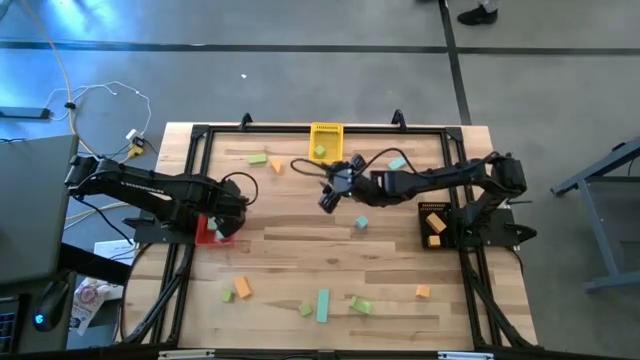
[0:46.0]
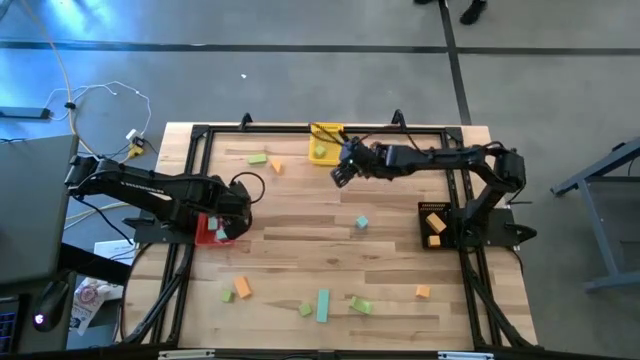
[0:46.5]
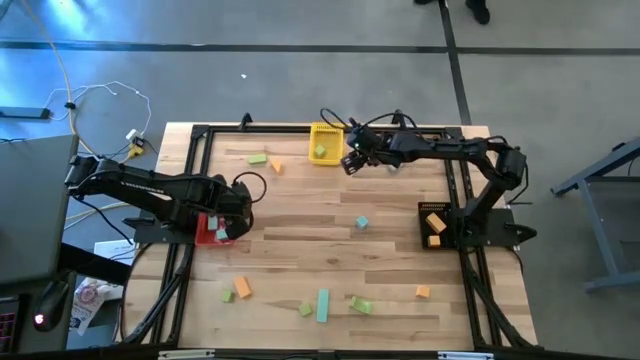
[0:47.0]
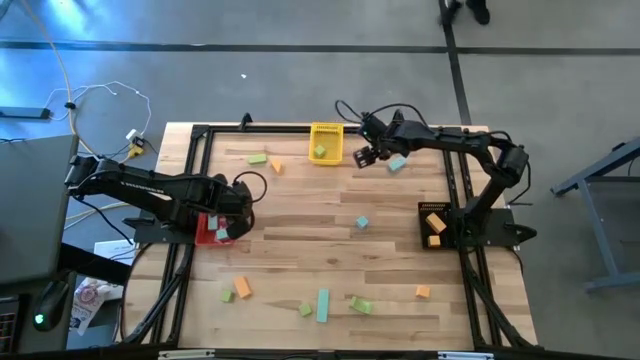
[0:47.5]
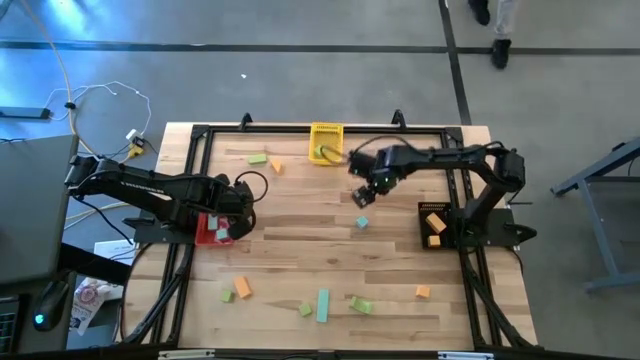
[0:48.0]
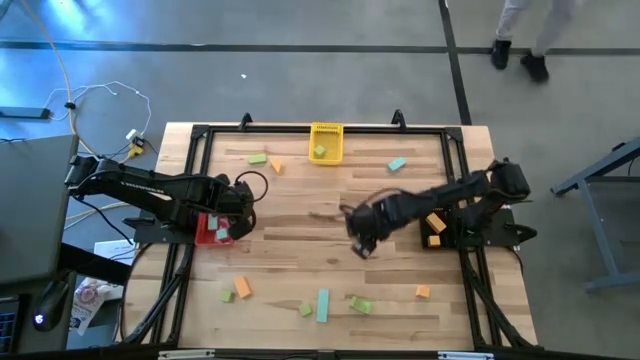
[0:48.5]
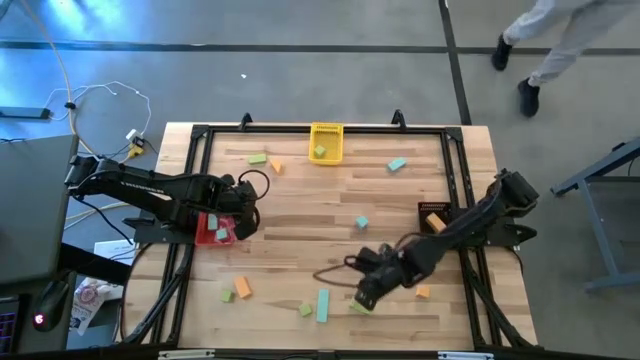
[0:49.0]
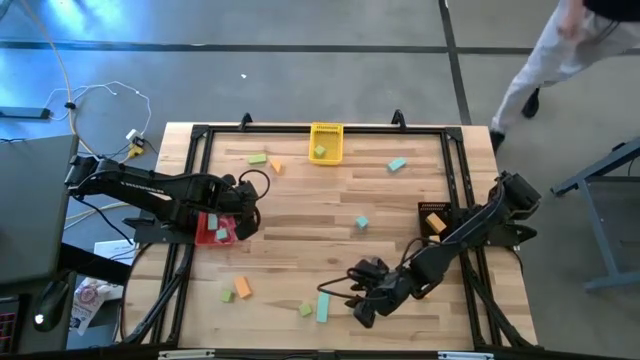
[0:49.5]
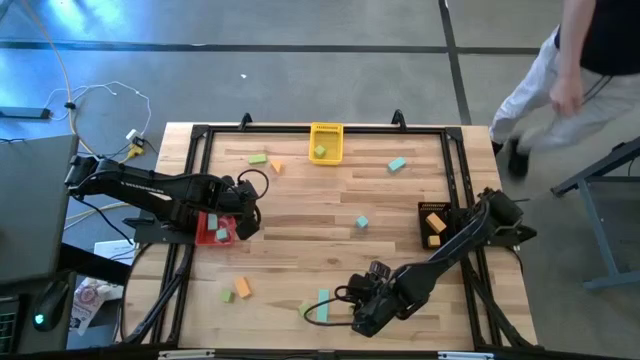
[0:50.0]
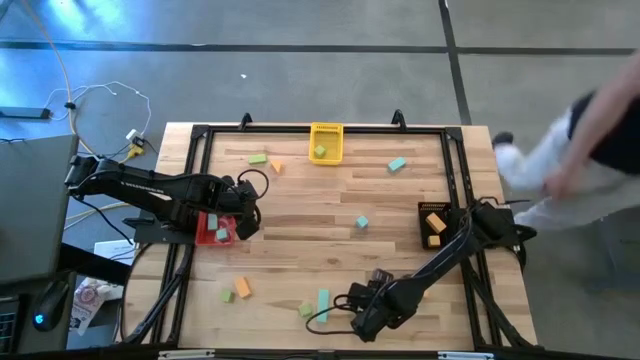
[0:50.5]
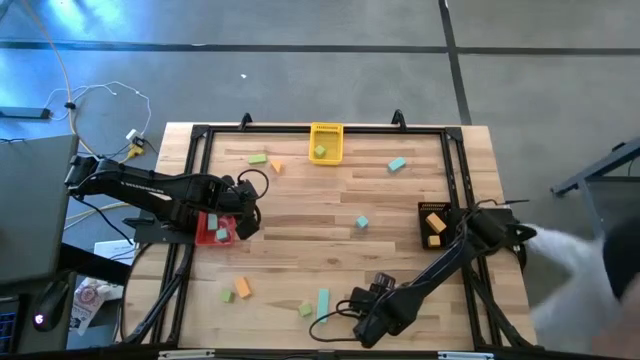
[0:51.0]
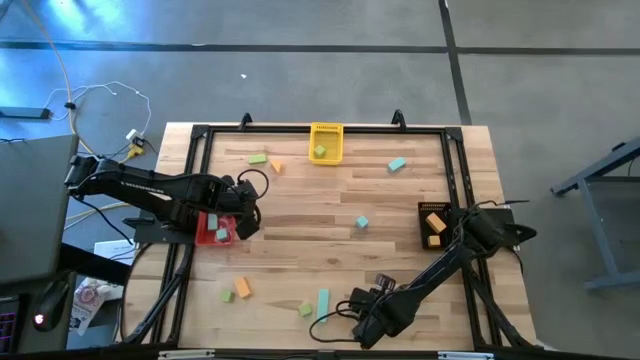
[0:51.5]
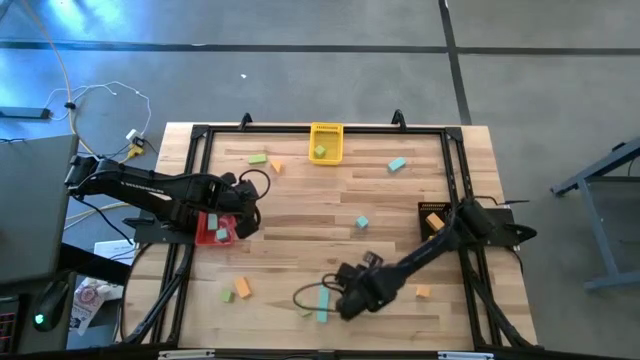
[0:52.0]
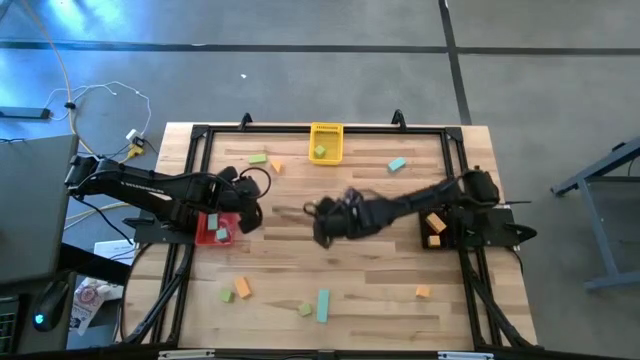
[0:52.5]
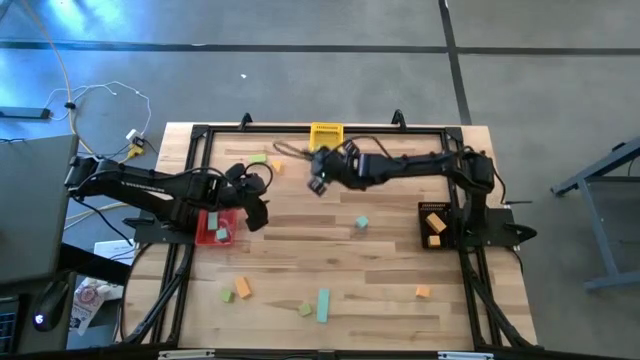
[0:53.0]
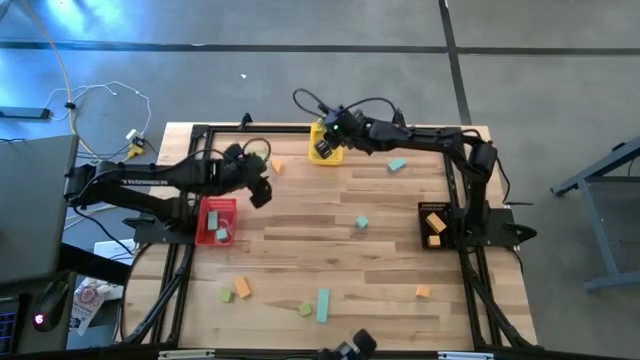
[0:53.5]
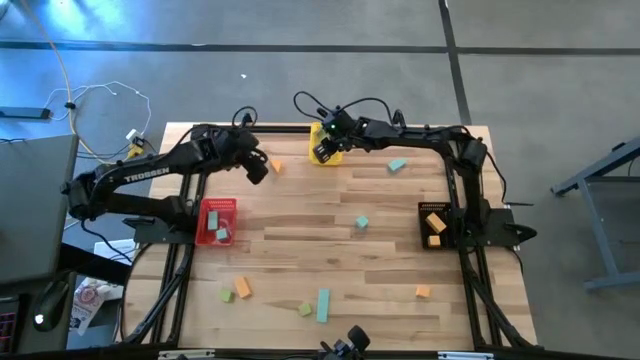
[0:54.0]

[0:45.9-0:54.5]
Task: Sort & place blocks by color
Put the green block into the yellow bin

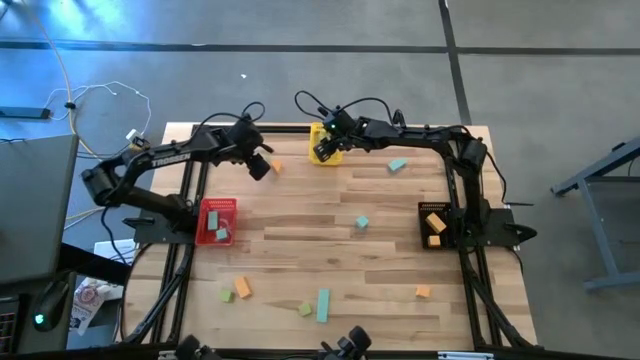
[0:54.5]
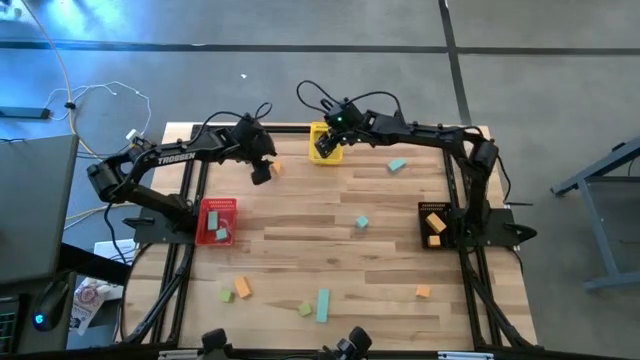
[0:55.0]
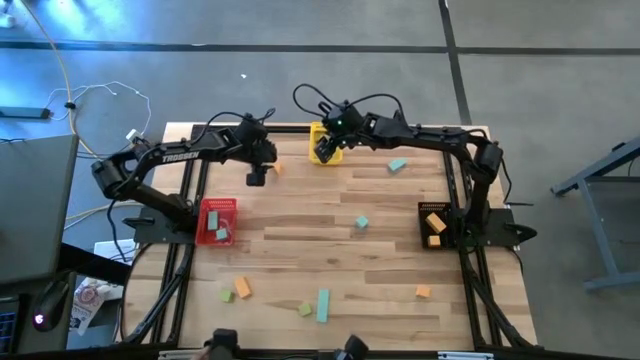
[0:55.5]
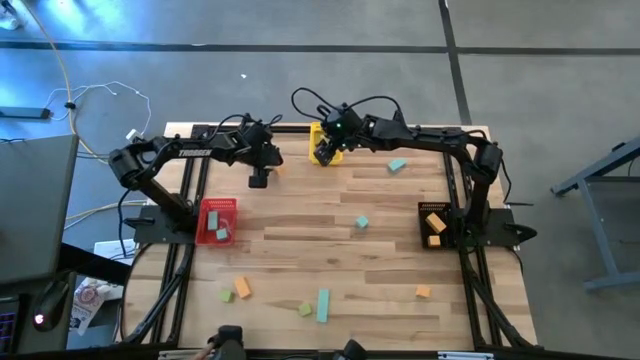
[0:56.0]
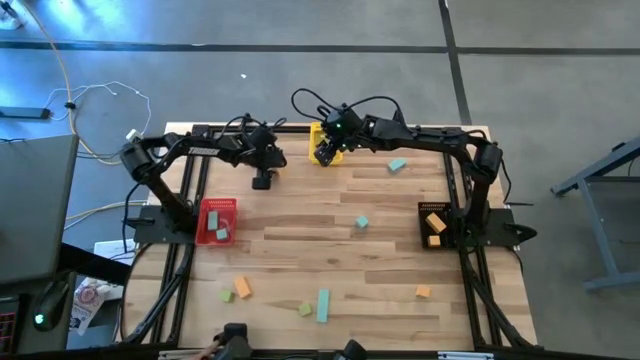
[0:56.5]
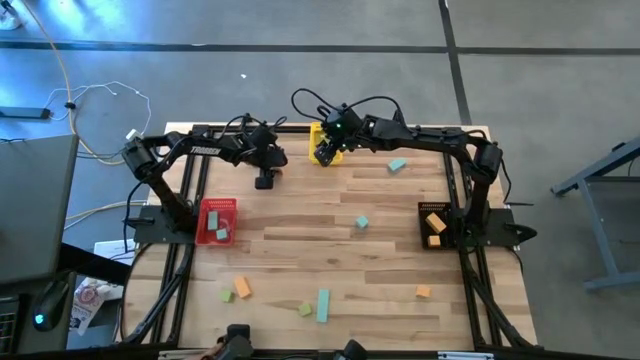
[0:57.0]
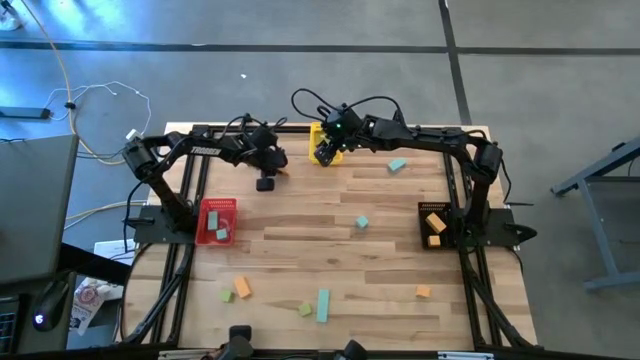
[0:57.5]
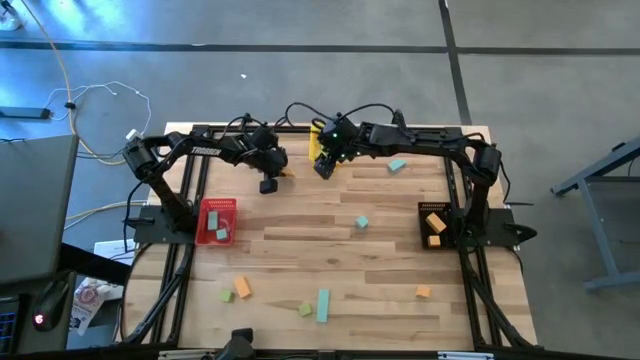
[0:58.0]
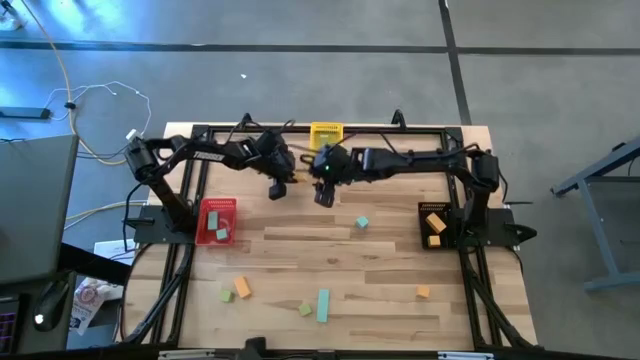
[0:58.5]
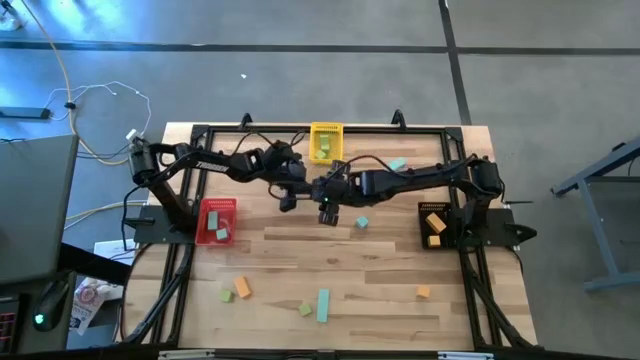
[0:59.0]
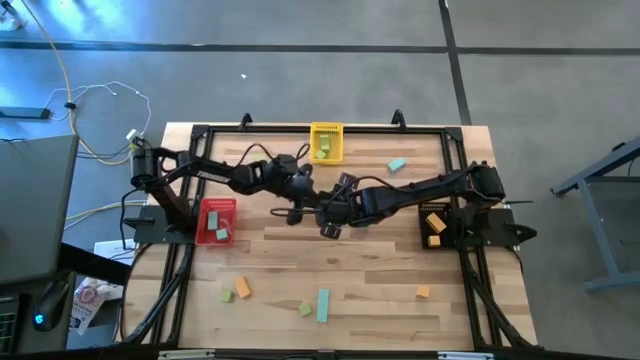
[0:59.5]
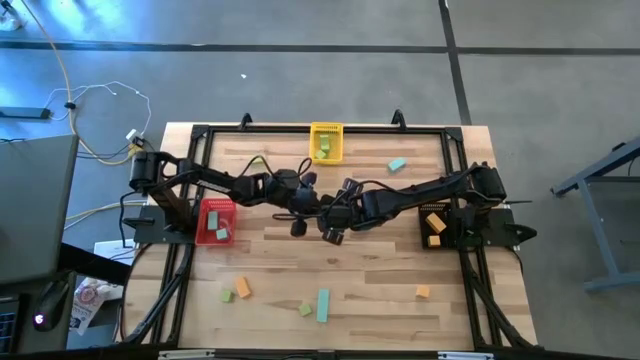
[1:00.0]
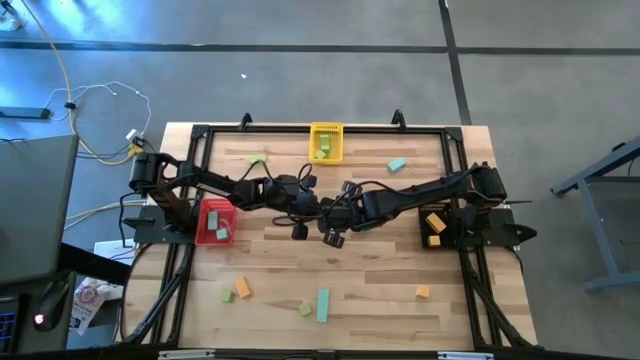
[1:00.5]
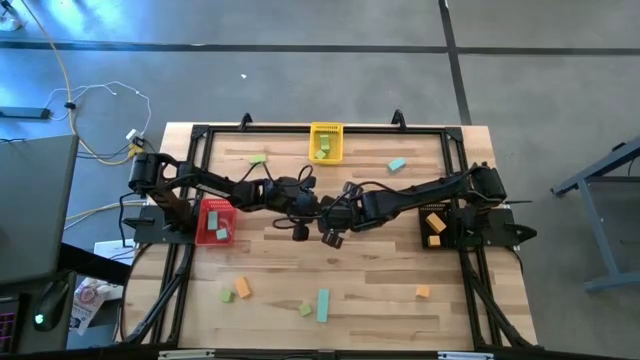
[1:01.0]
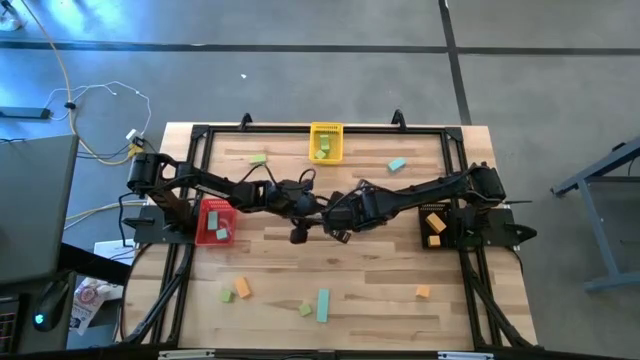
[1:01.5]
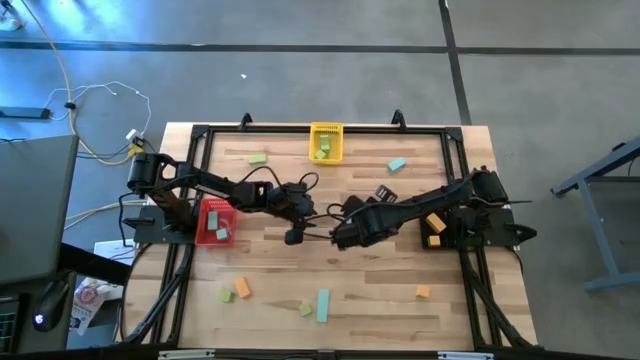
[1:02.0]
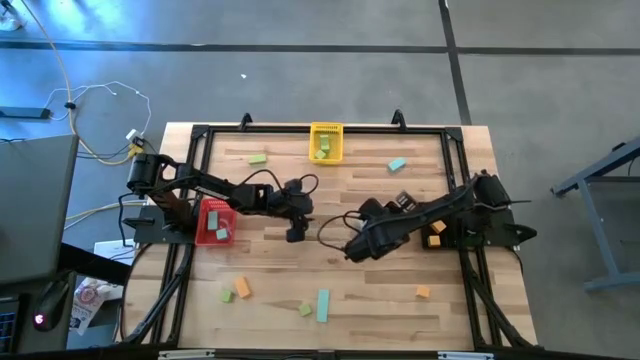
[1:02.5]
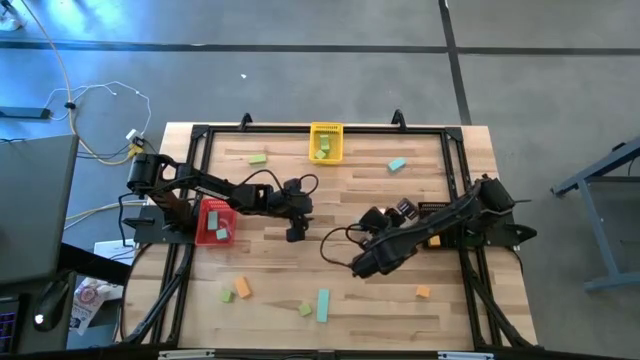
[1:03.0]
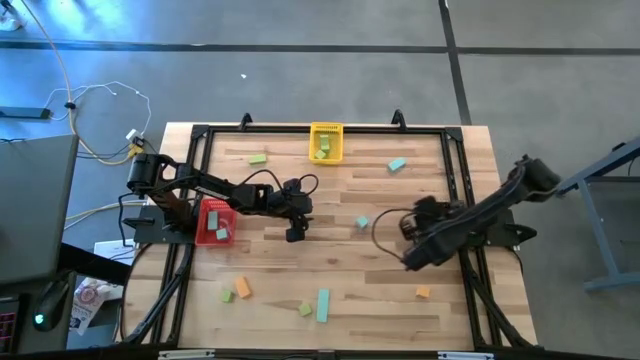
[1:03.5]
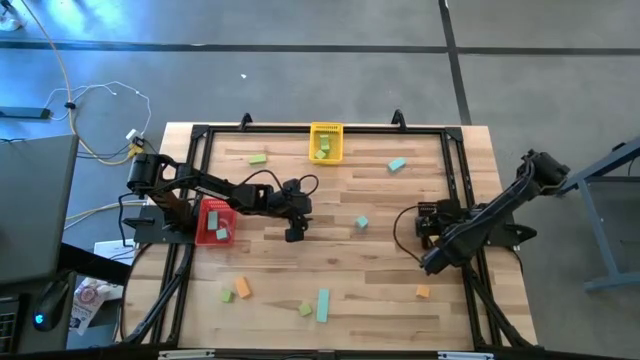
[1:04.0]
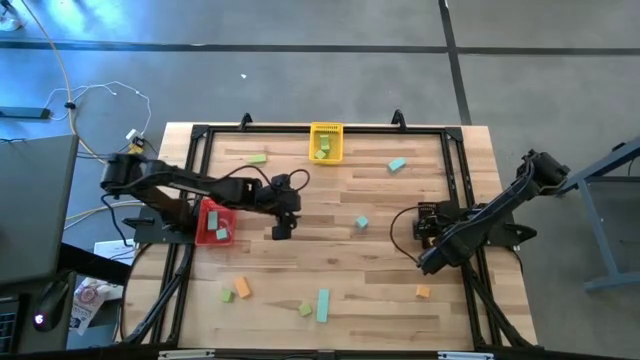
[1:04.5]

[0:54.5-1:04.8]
Put the orange block into the black bin

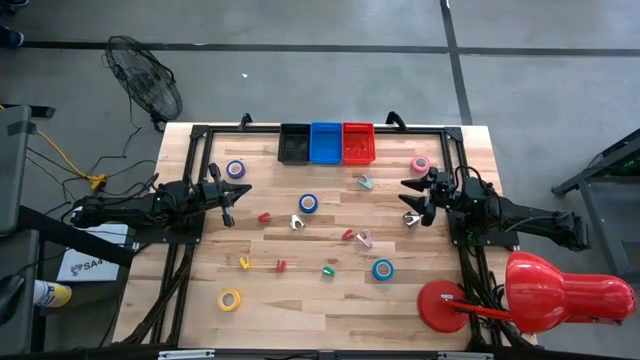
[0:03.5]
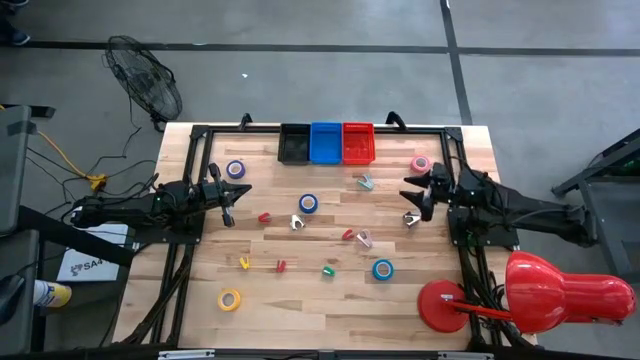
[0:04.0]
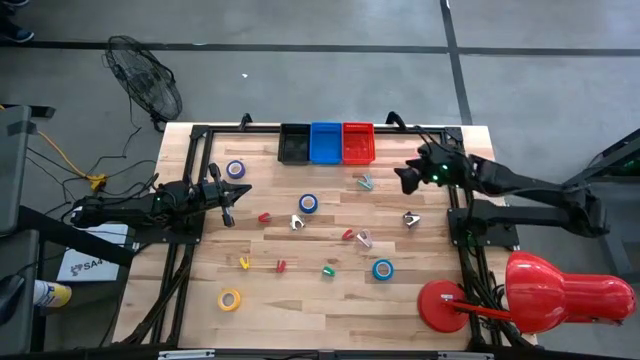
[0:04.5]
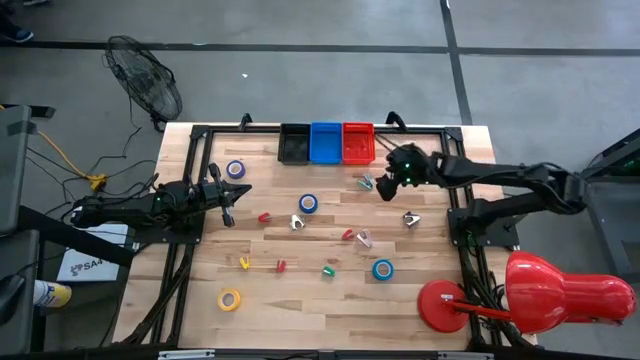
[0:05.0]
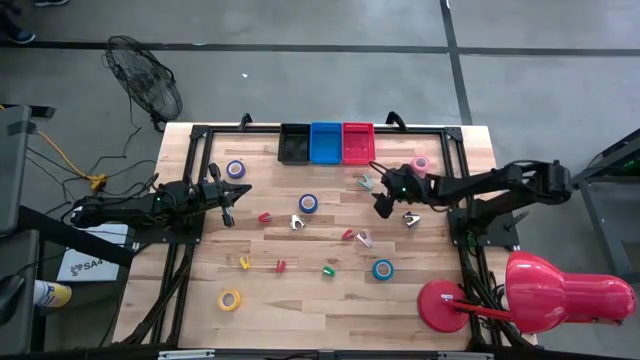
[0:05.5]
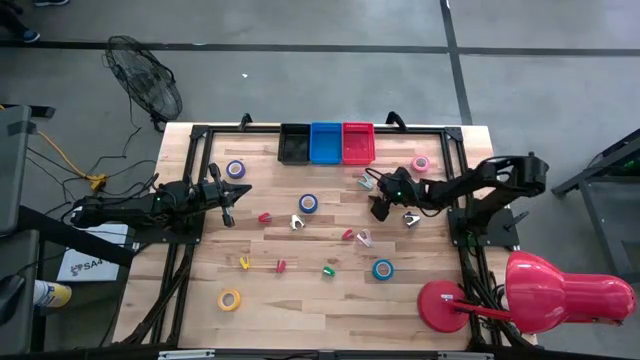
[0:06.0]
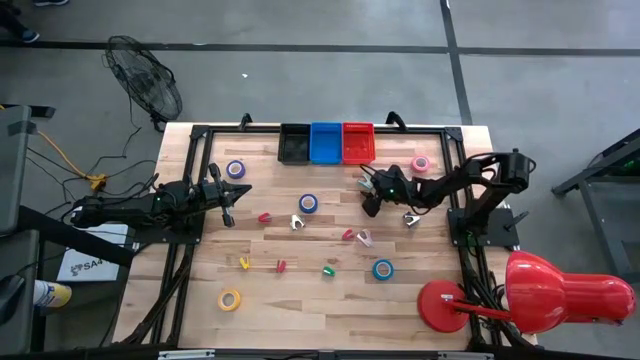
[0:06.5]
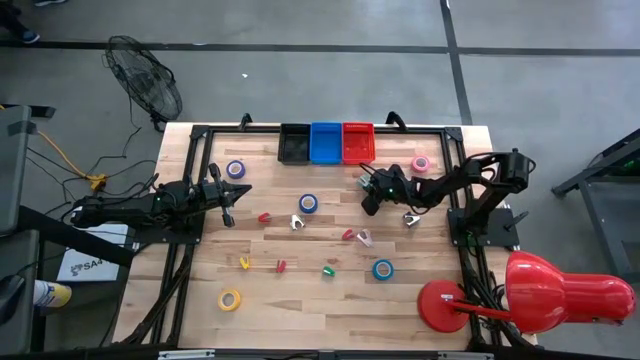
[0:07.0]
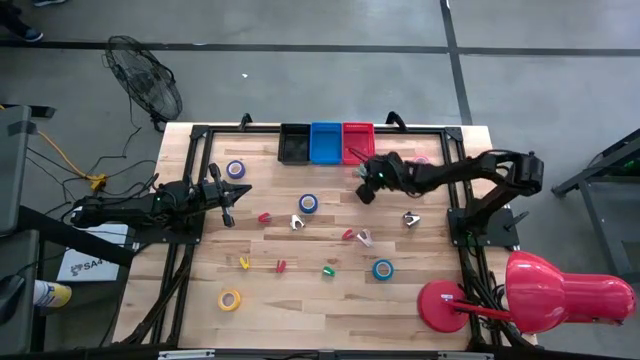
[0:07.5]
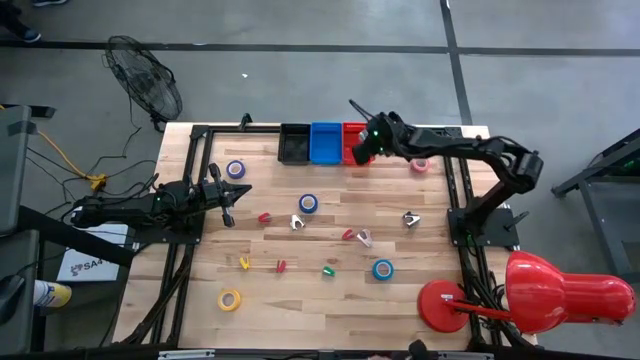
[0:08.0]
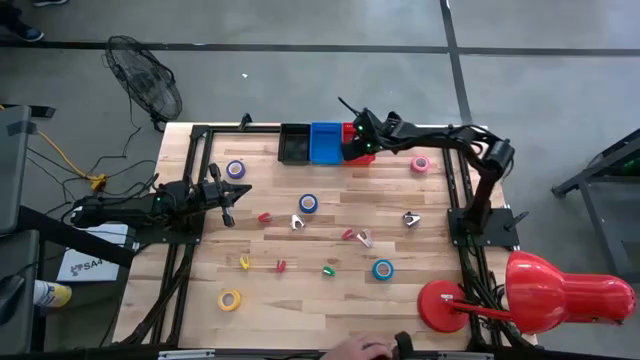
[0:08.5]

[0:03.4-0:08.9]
Task: Pick and place Stapler, Stapler remover, tape
Put the light blue staple remover into the red bin
